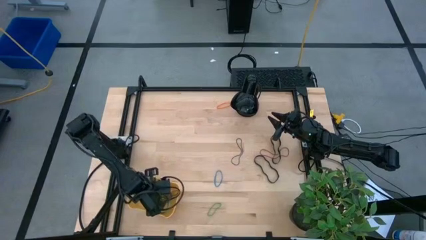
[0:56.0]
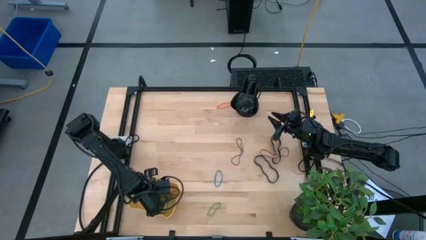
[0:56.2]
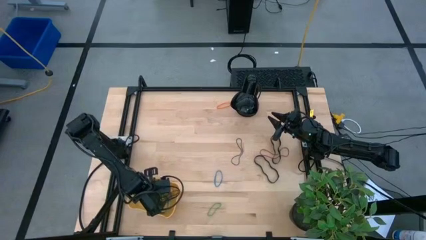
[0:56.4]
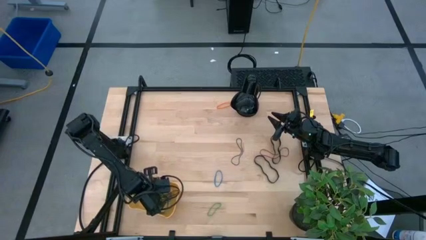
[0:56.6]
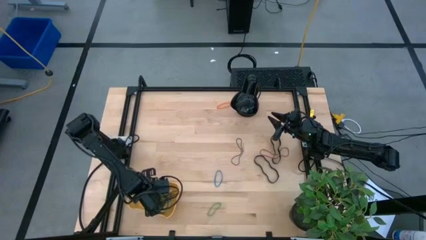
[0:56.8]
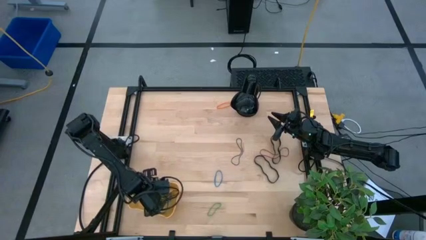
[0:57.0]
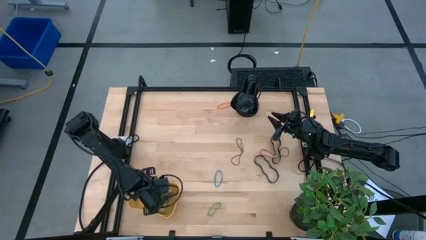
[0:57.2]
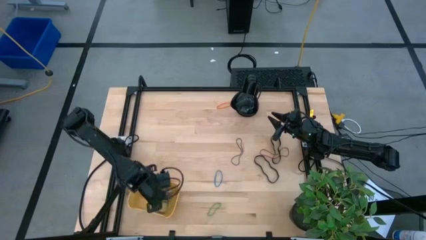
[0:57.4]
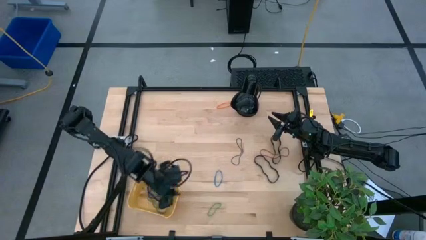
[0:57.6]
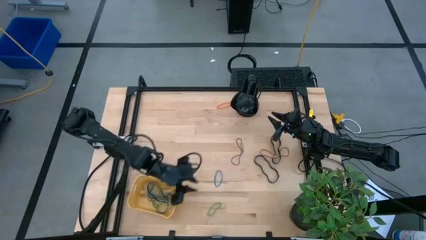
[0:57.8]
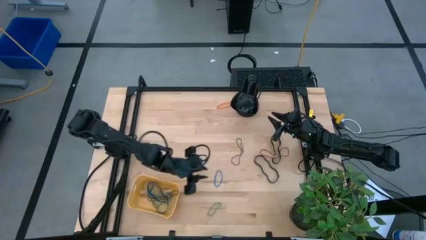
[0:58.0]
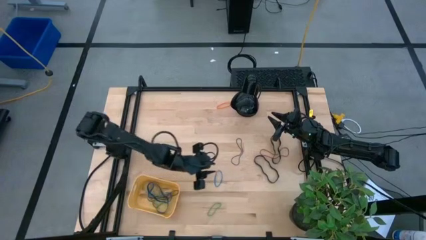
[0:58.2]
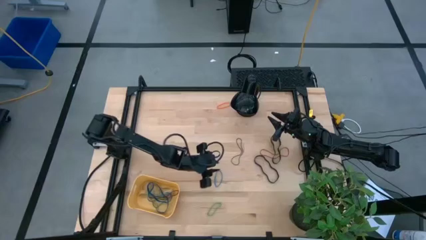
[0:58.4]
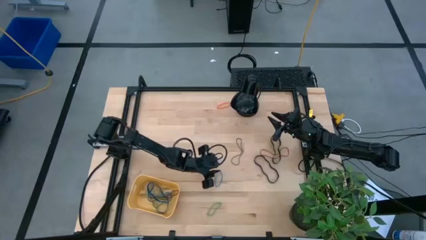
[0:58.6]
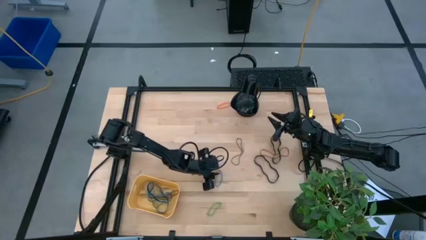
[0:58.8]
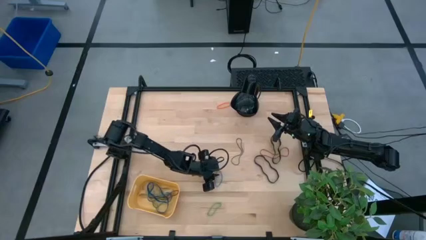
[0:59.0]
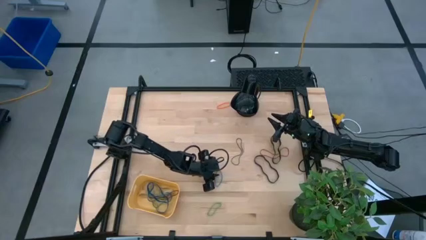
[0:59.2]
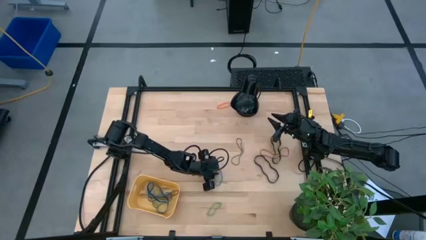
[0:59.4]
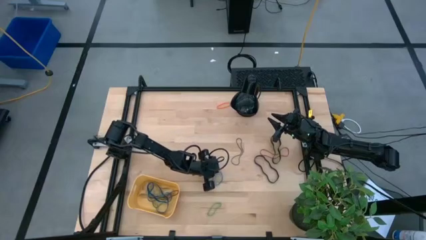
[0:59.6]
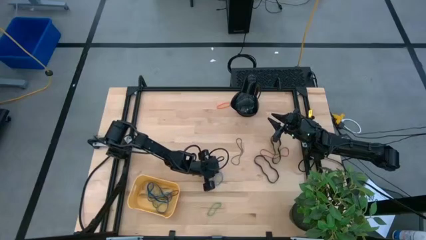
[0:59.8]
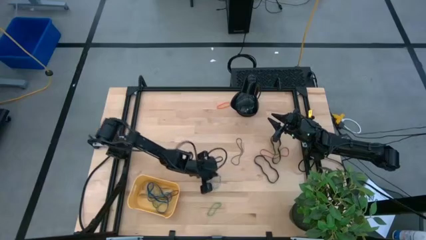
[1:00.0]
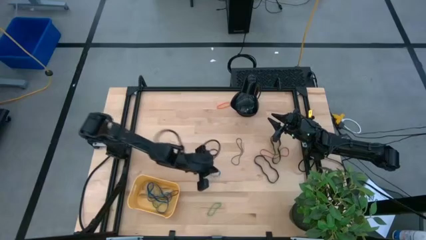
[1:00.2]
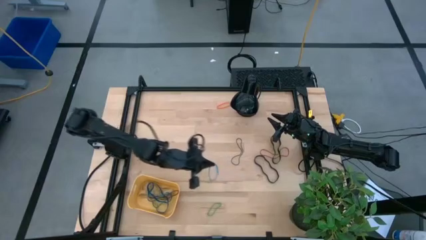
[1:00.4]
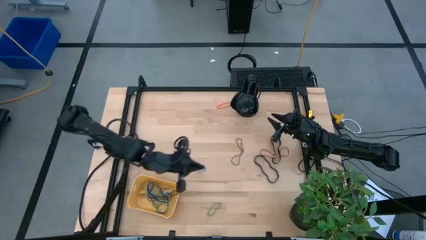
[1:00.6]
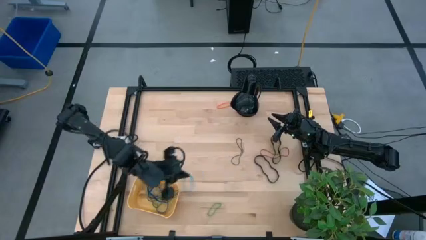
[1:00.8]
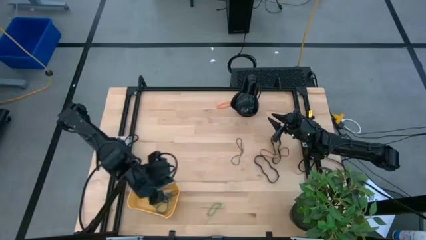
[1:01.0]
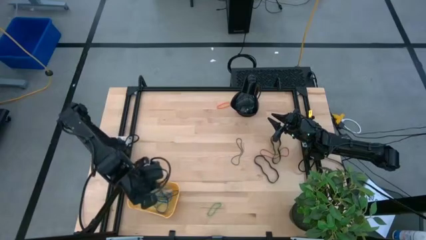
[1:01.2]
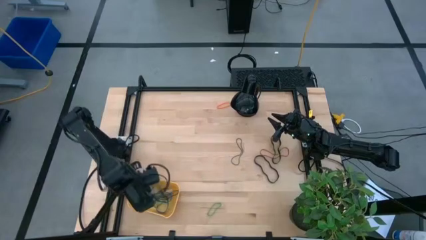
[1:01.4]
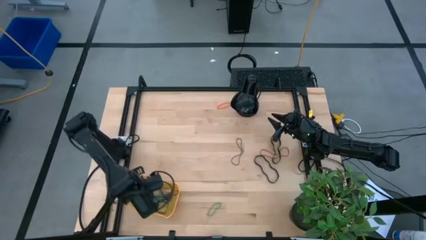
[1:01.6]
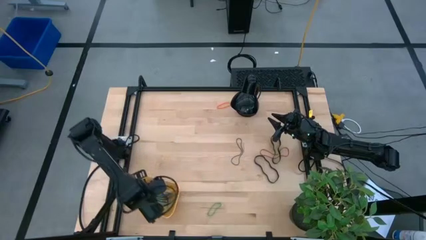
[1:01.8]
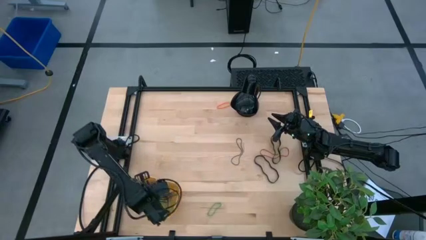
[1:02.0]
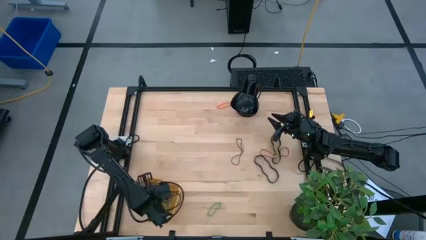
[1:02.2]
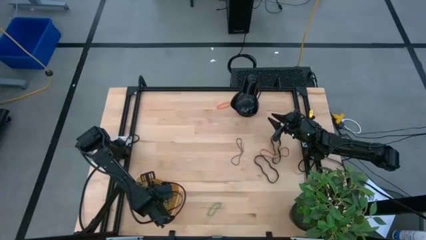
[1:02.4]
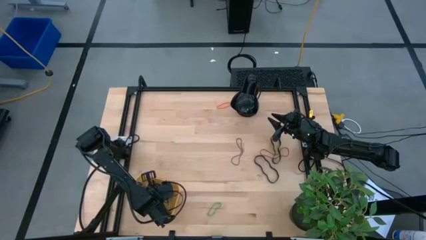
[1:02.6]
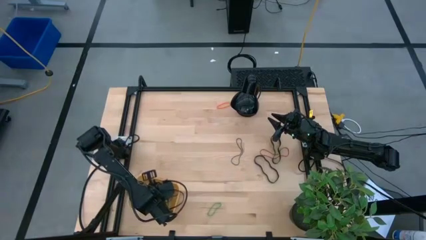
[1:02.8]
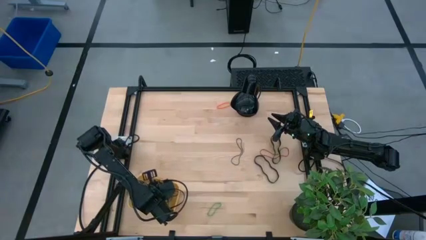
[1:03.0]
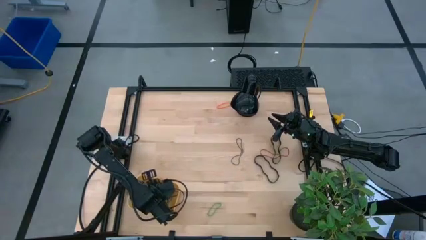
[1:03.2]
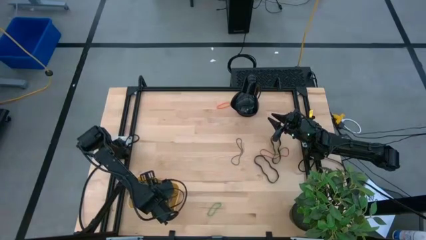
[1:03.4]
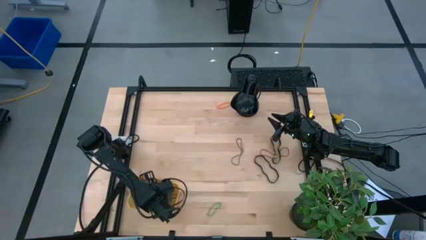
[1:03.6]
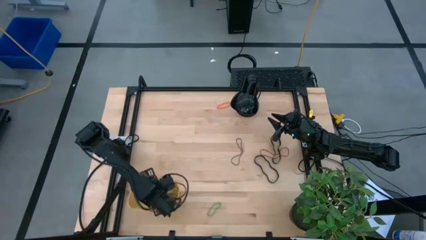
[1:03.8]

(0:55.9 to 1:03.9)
Task: Pick and place rubber bands into bin
Put the blue rubberband into the yellow bin

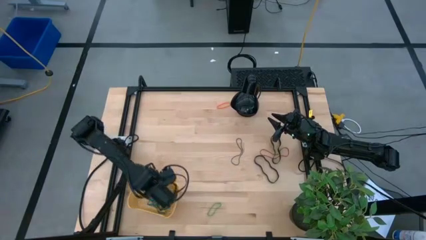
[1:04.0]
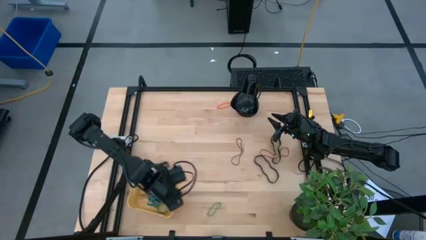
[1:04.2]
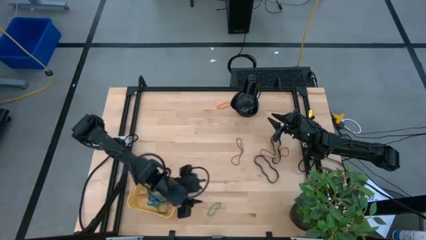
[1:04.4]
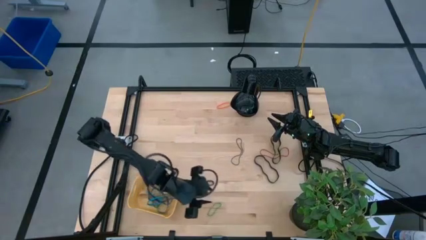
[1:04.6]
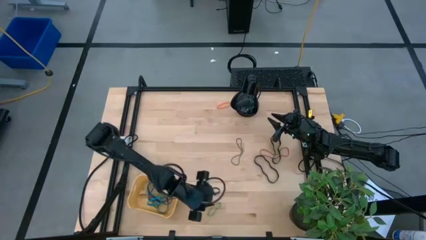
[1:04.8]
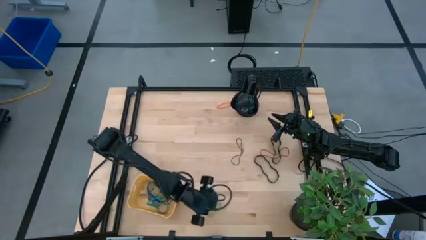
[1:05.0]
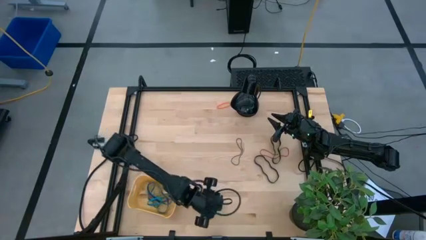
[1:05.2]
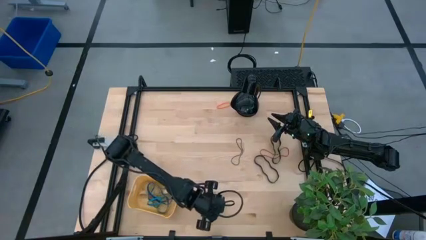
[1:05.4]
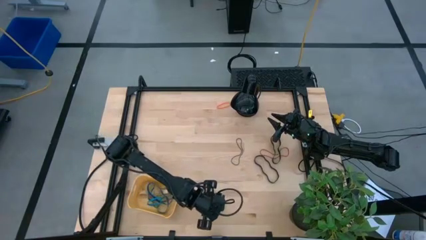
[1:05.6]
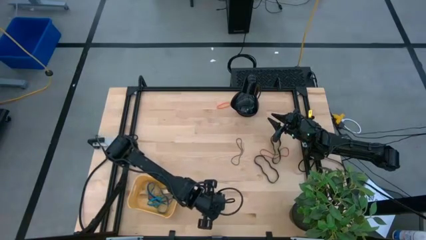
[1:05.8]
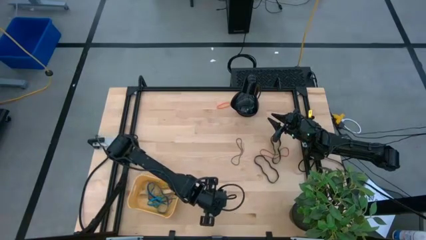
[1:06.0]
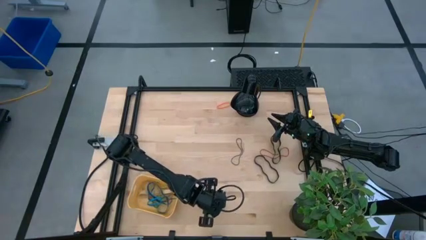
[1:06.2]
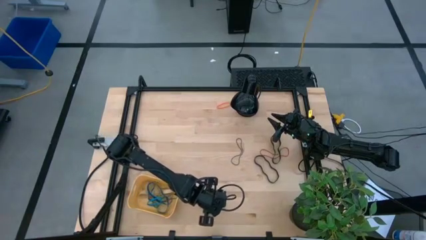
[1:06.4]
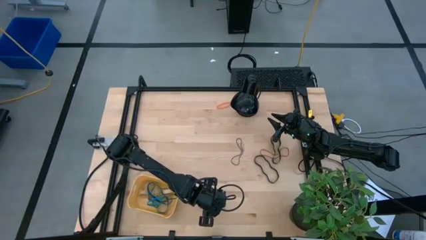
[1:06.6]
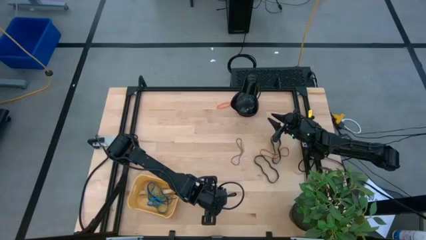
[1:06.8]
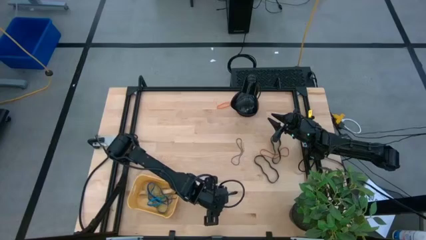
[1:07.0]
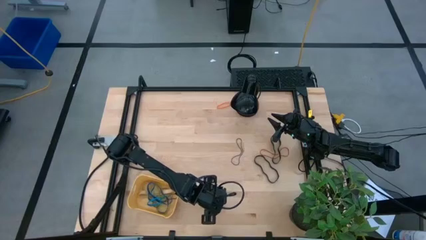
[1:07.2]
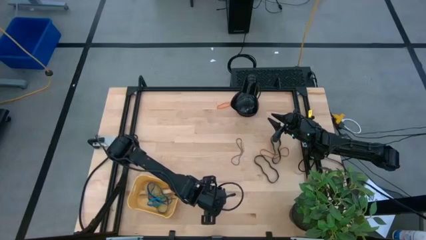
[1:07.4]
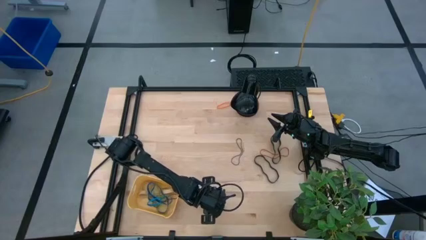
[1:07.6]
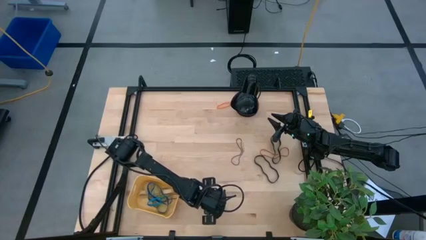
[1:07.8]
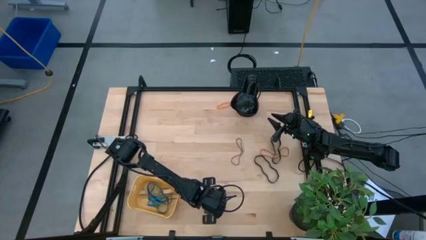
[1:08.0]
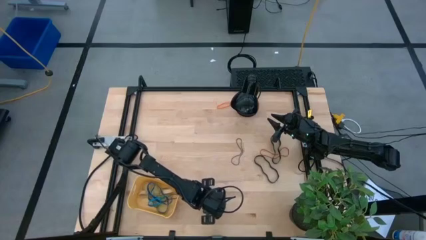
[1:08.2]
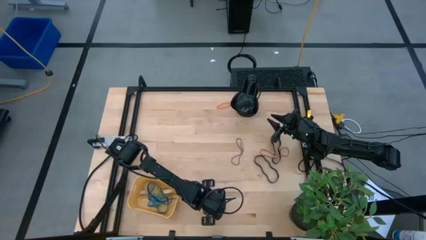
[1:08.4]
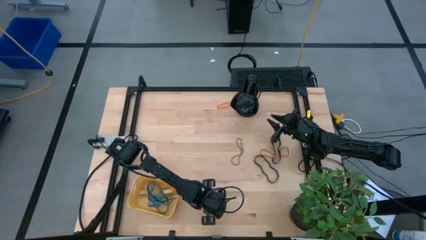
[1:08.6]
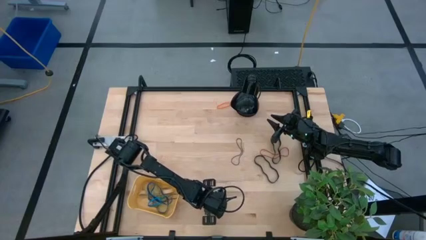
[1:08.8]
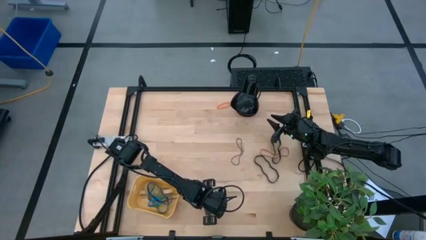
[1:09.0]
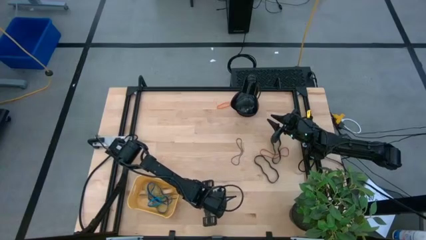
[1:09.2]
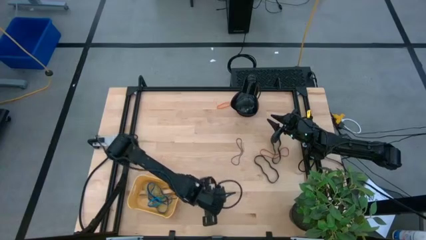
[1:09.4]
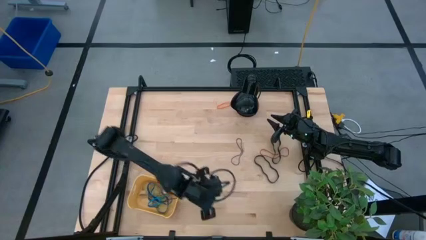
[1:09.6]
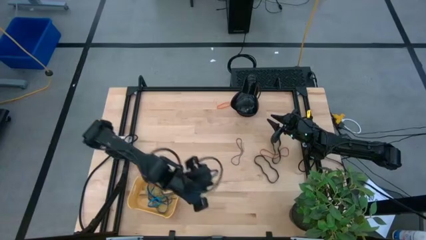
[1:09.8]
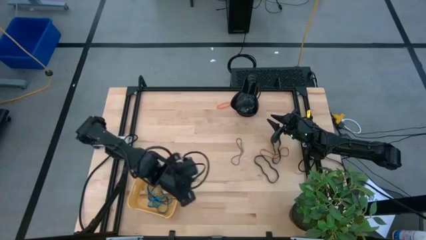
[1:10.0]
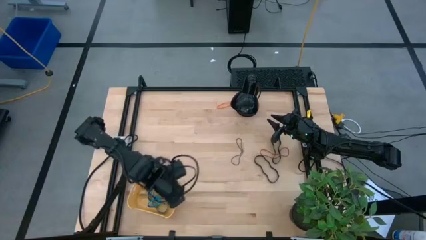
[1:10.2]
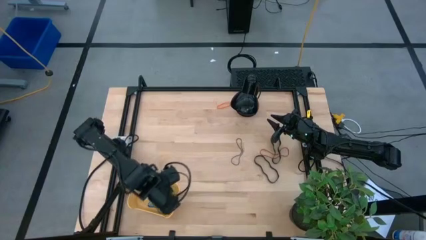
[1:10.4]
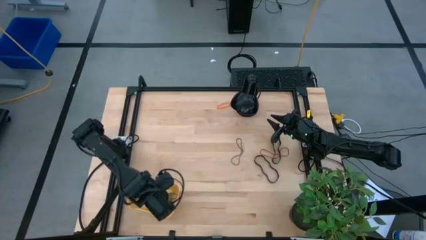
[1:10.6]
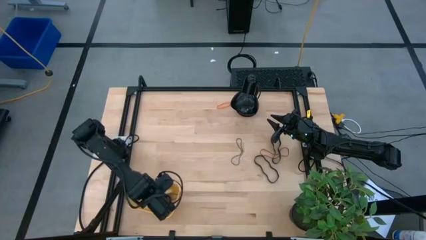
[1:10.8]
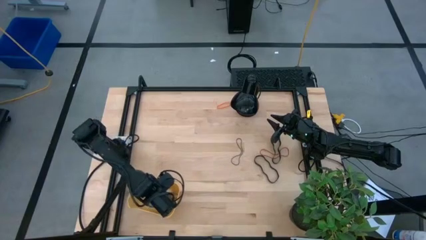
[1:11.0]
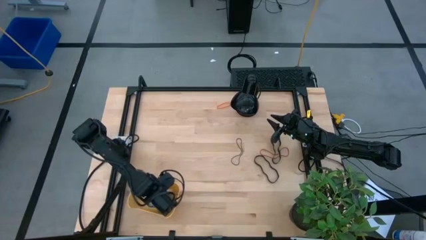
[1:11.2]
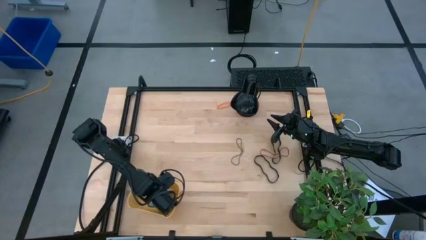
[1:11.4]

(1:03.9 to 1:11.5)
Put the green rubberband into the yellow bin
